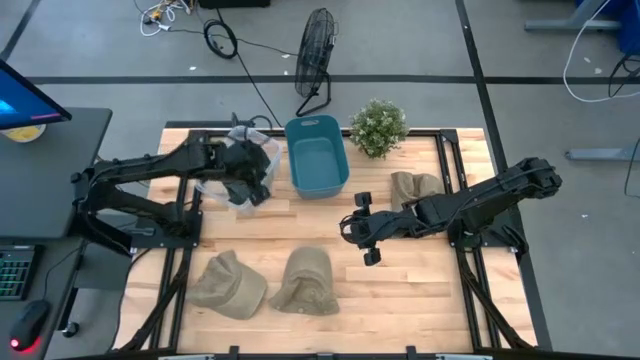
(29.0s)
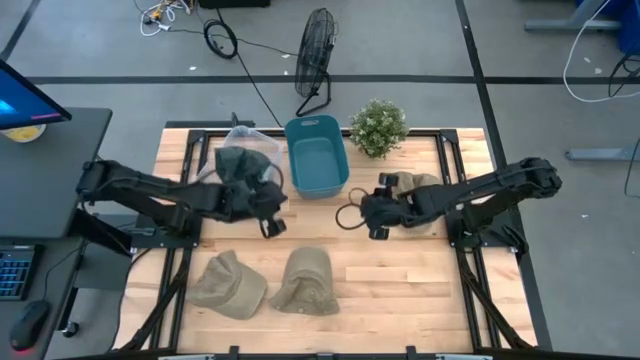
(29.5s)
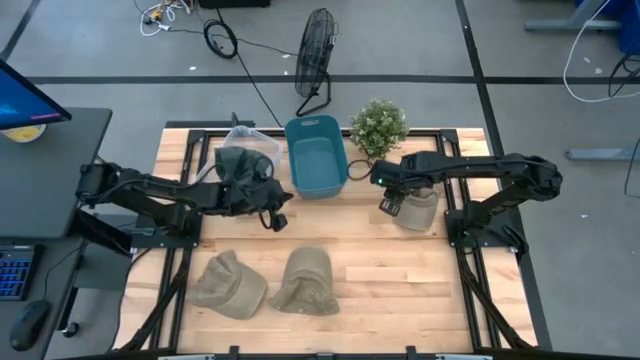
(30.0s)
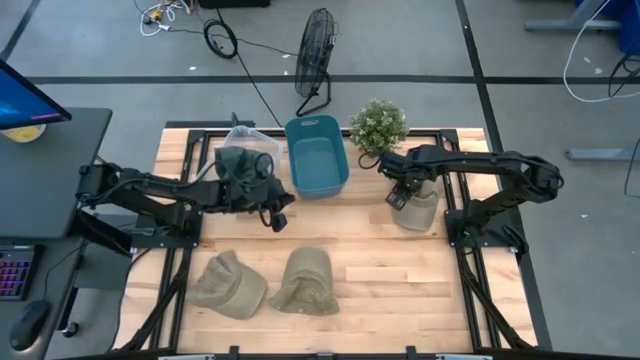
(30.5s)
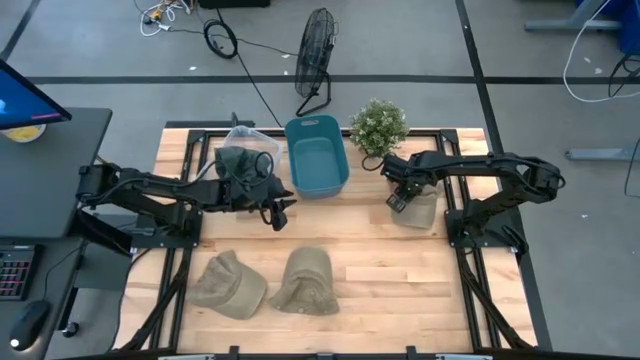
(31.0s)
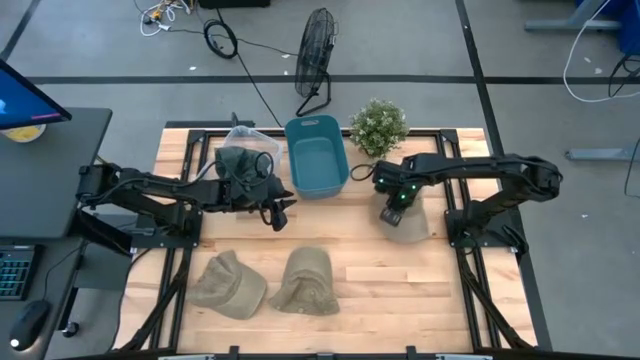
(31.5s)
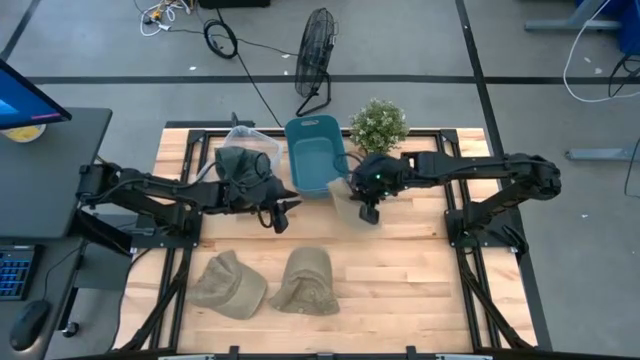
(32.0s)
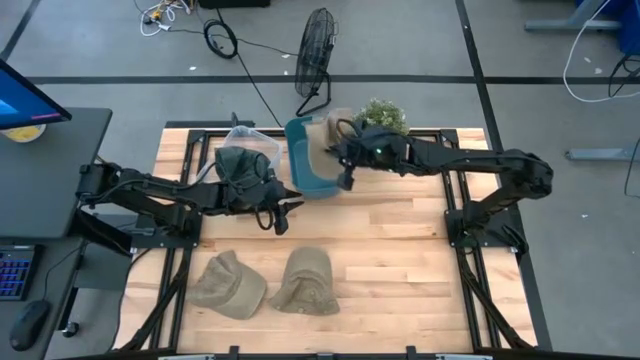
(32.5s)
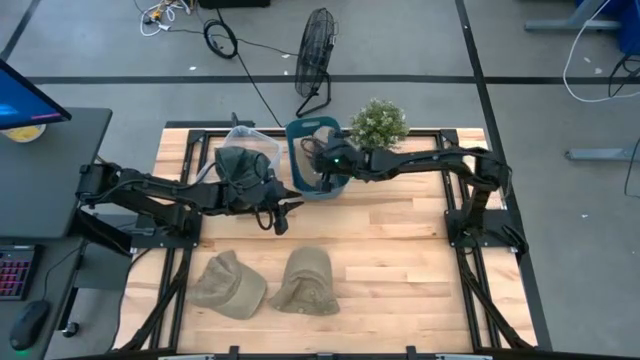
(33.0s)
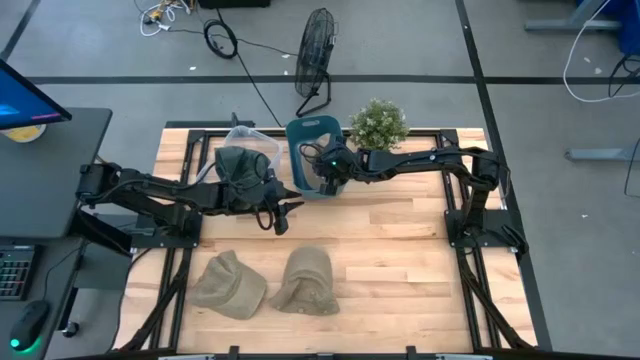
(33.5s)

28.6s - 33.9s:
Task: Pick & Place hat
Put the right brown cap into the blue bin

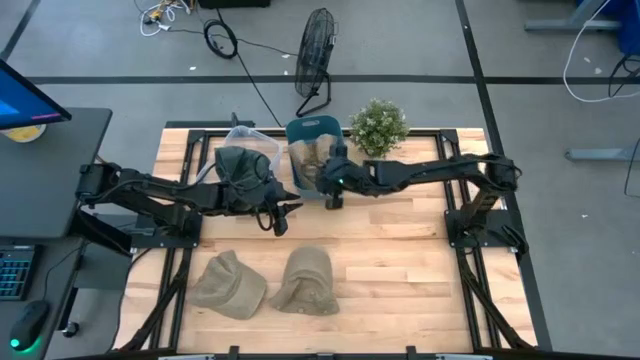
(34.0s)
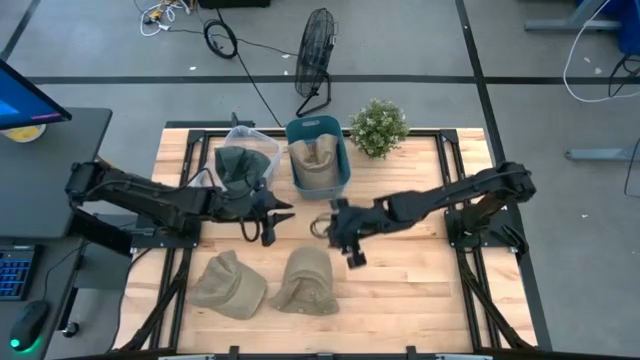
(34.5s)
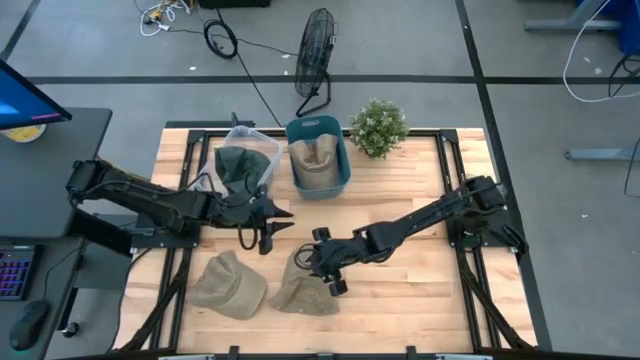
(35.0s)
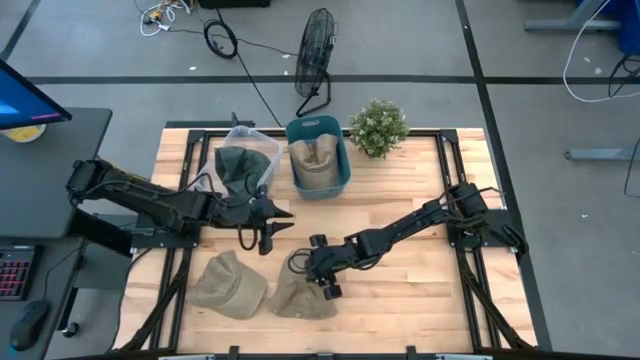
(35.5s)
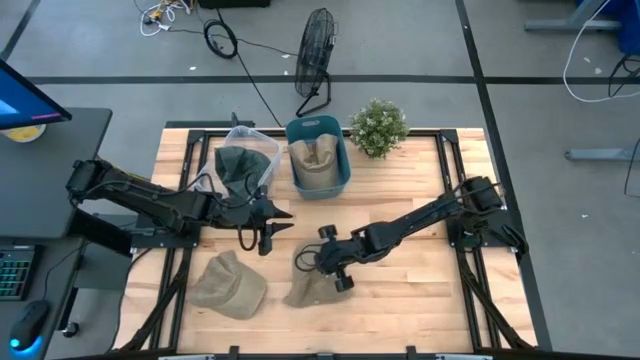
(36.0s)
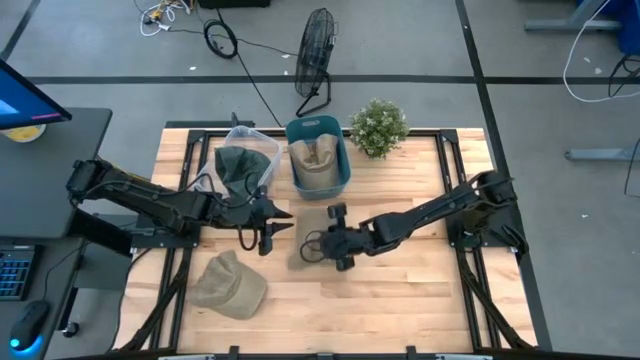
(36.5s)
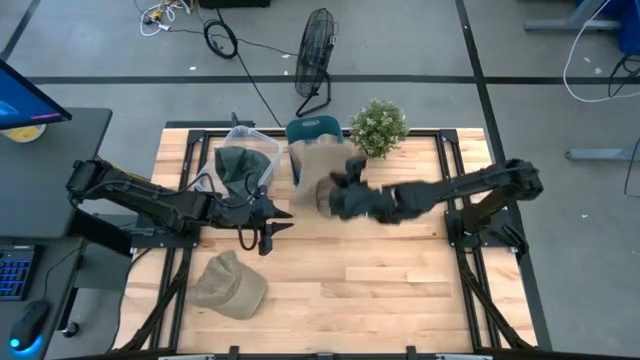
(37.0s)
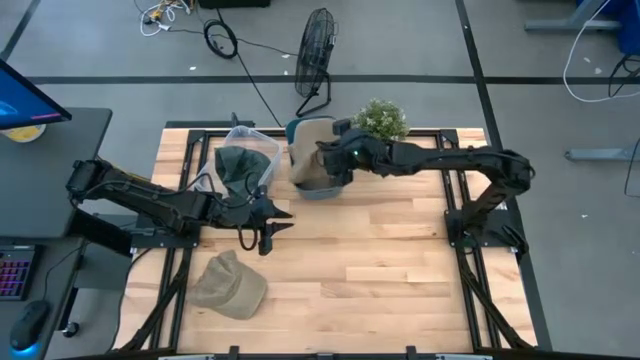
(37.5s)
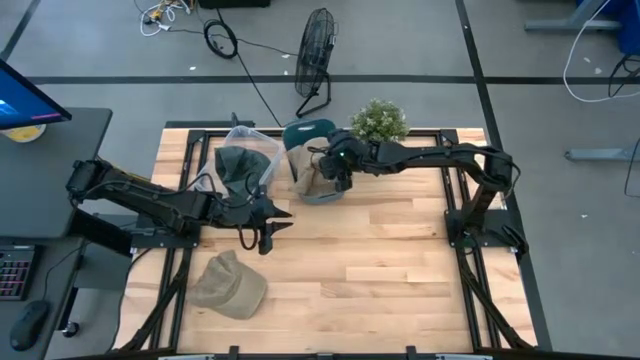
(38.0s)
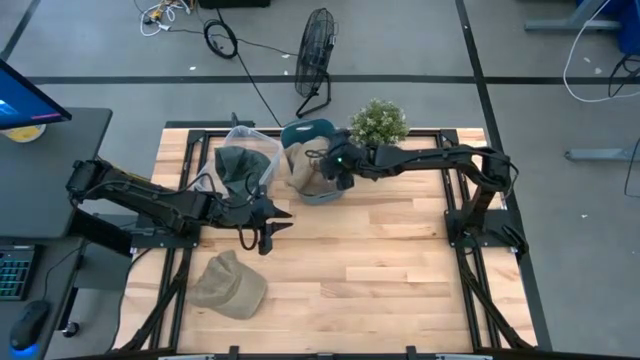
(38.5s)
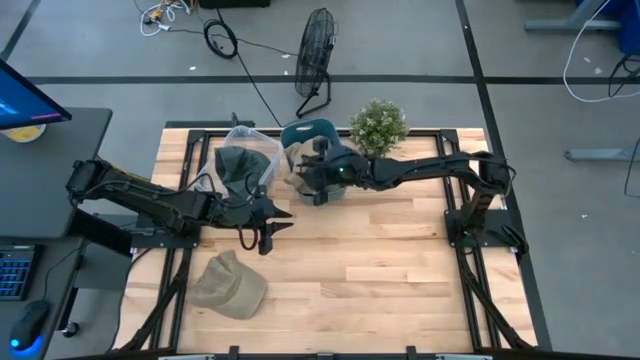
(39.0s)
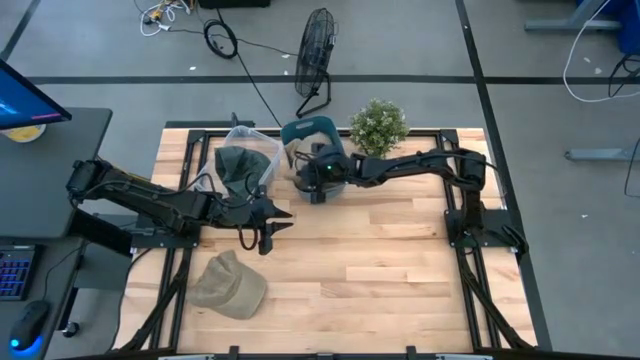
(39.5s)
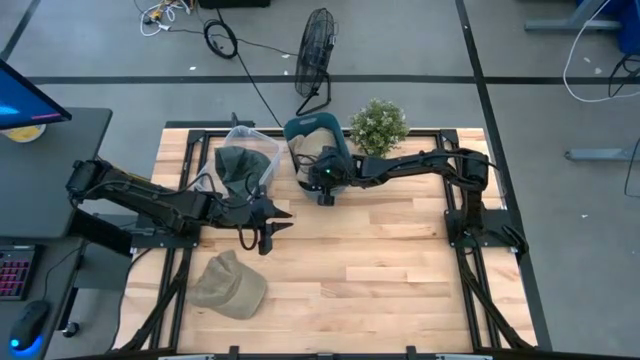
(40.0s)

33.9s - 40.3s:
Put the right brown cap into the blue bin

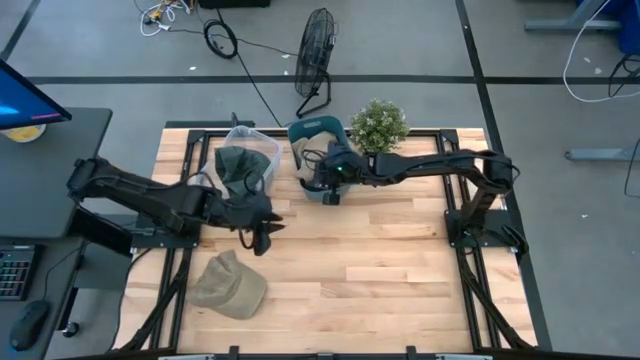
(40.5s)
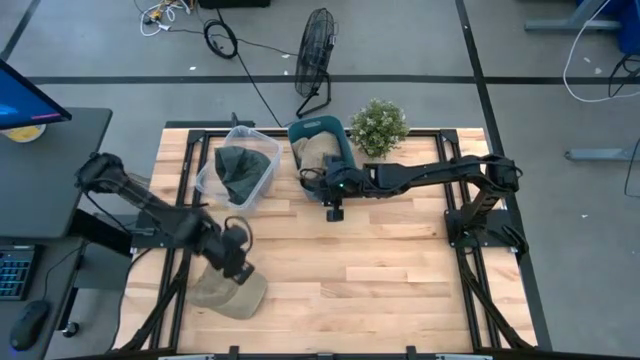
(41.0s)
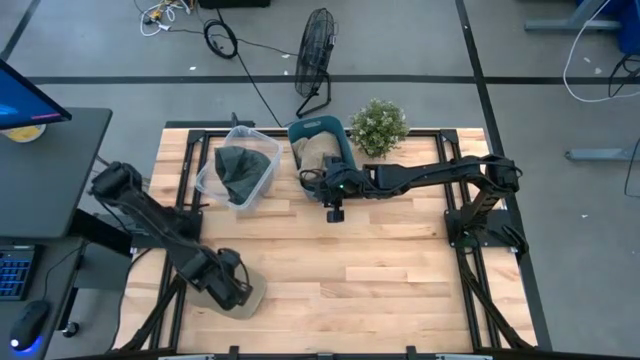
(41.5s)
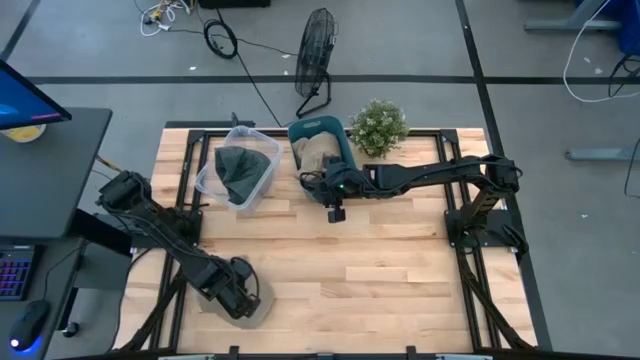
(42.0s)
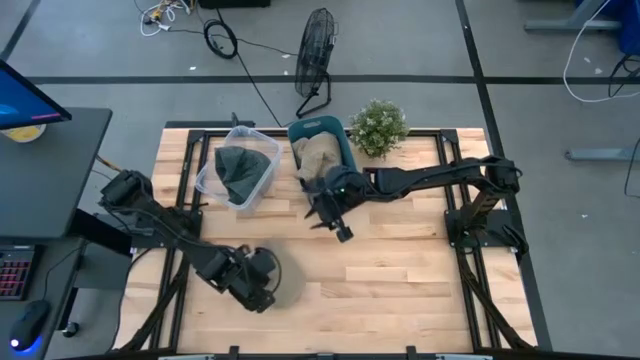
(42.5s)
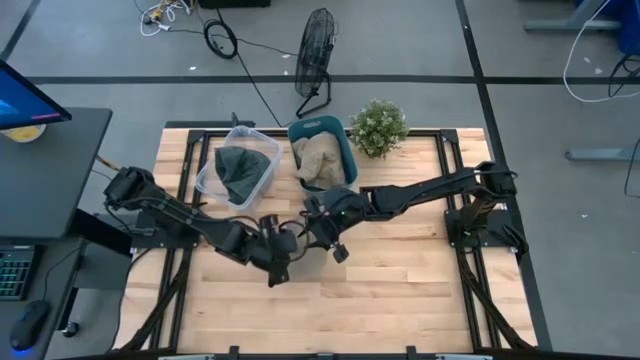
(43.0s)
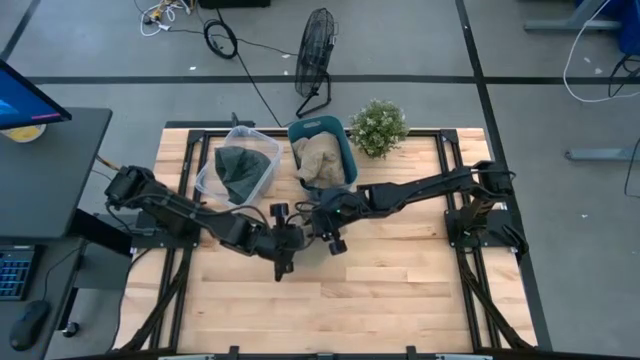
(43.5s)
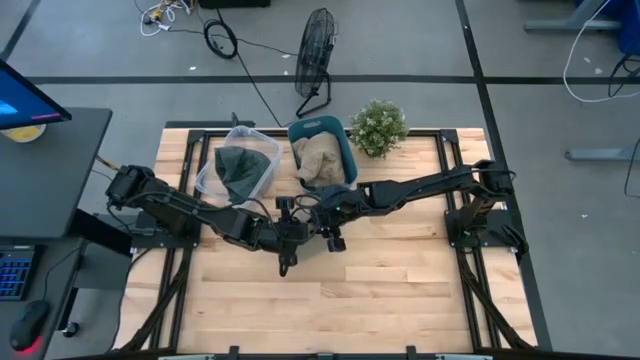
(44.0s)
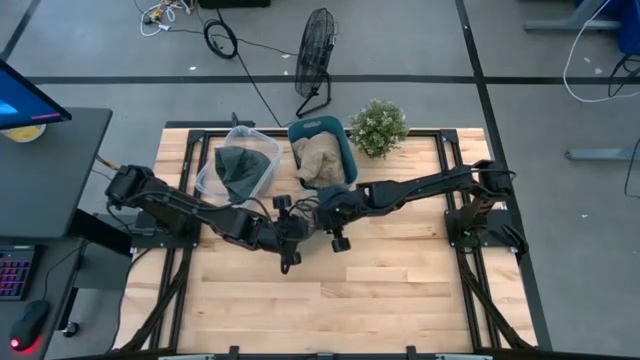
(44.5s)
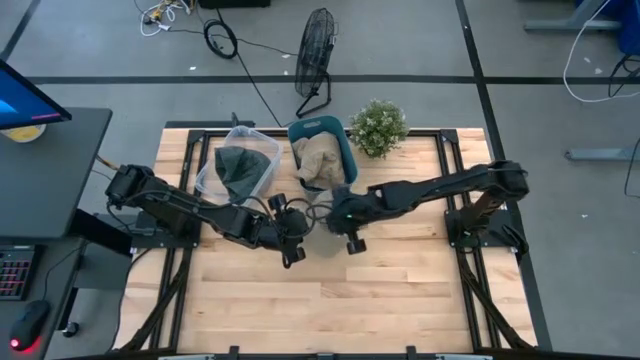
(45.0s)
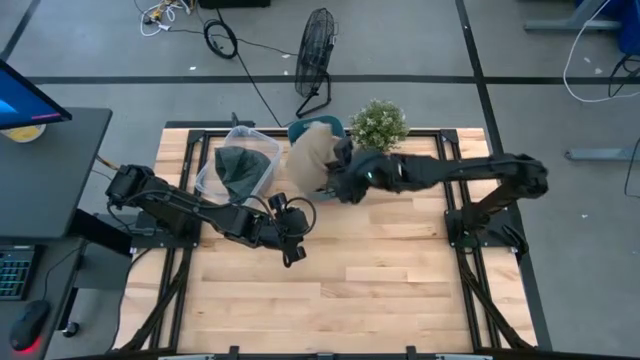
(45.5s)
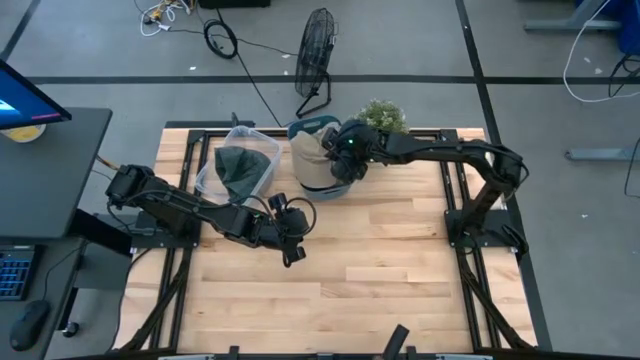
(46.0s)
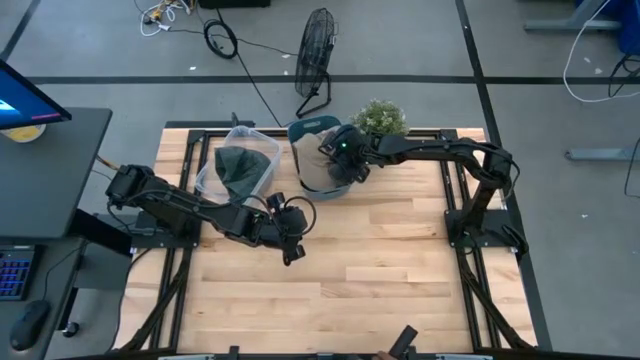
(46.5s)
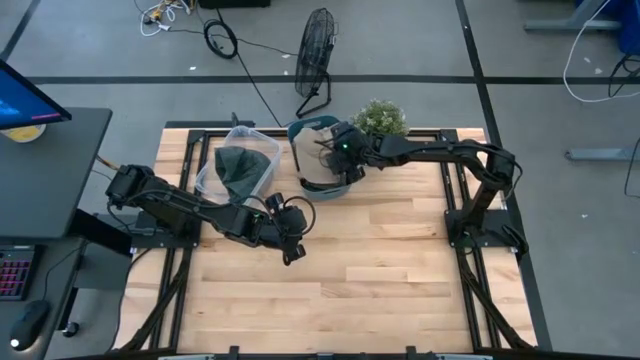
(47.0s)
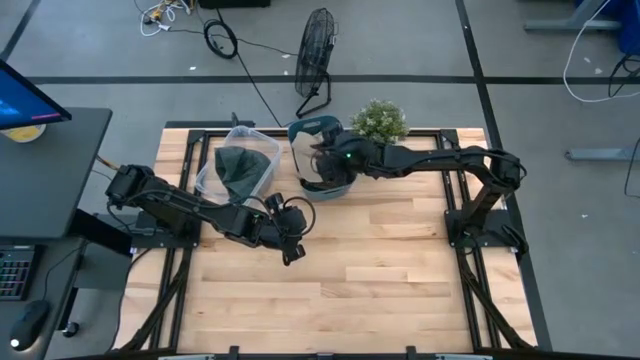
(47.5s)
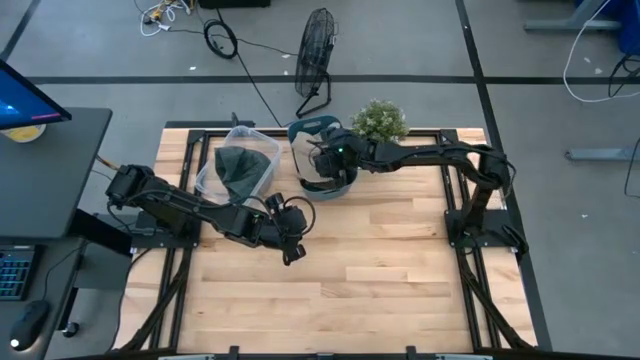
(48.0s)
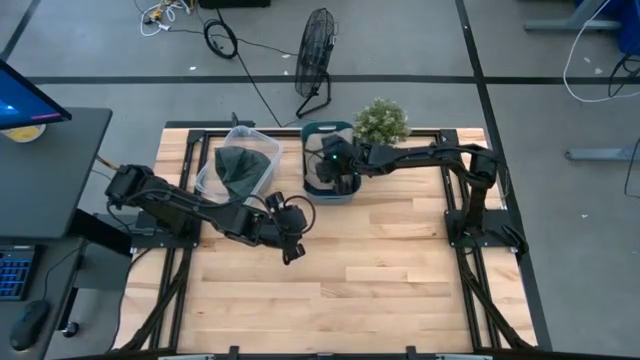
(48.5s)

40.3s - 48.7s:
Put the brown cap into the blue bin

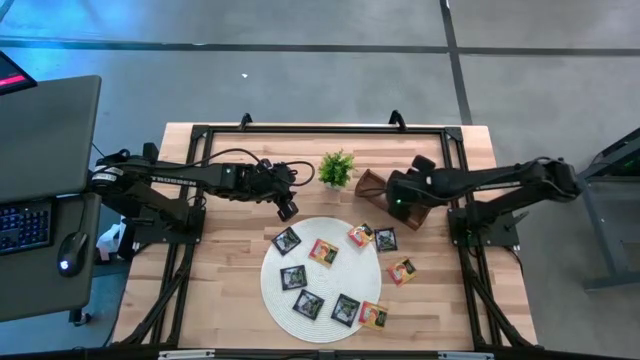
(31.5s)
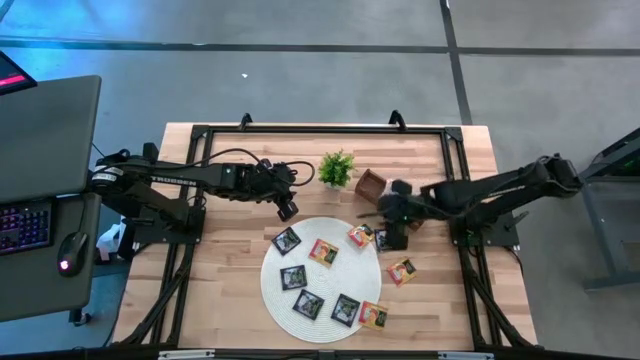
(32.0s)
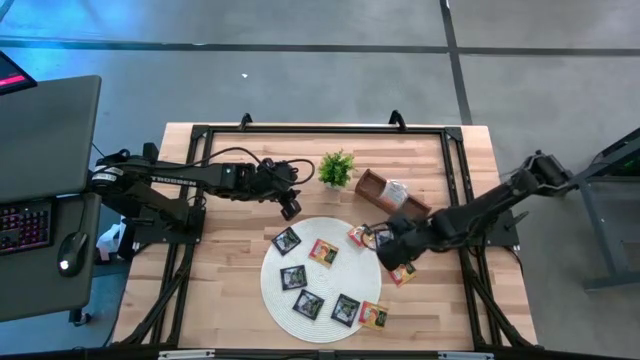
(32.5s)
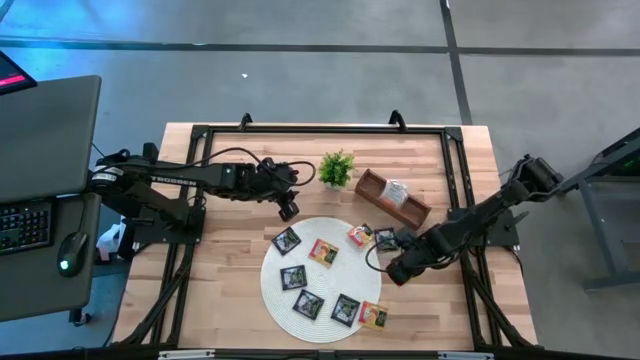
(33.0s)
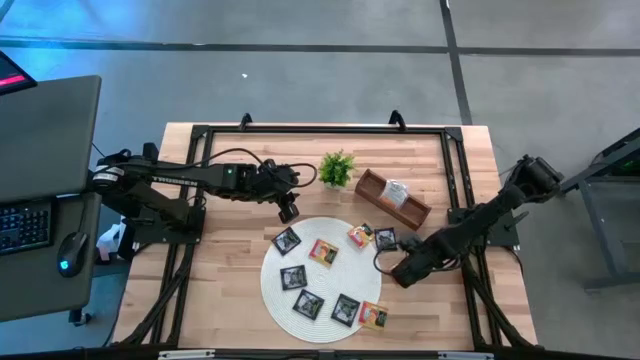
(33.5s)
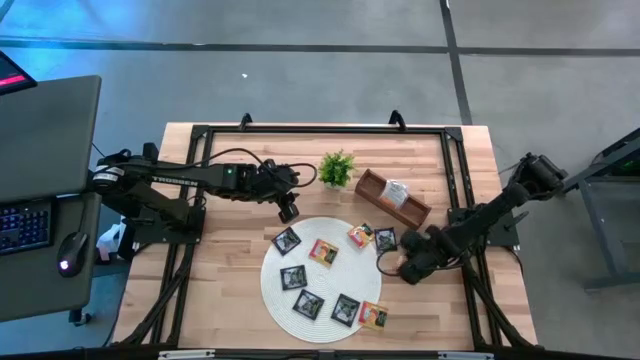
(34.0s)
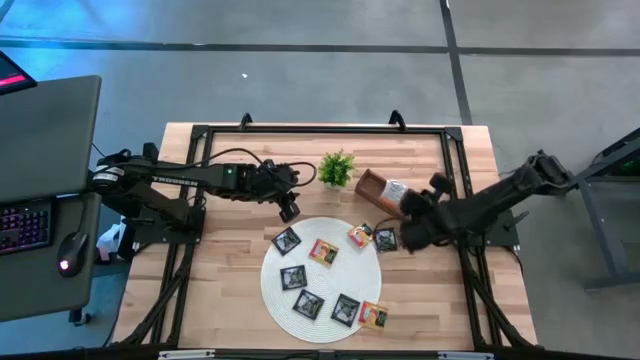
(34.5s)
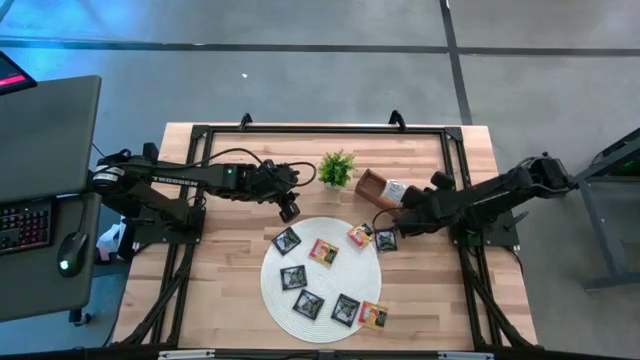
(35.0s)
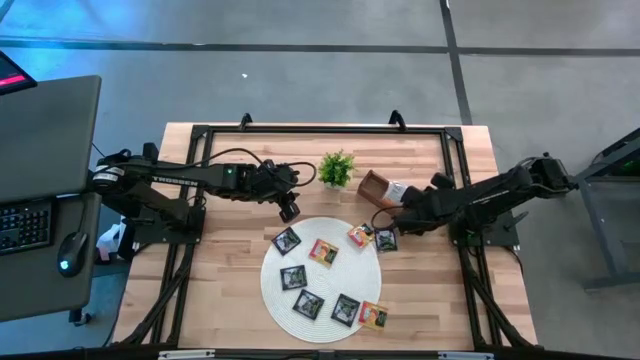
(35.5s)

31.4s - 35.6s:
Task: Pick & Place Tea
Put the yellow tea bag into the right section of the wooden organizer
